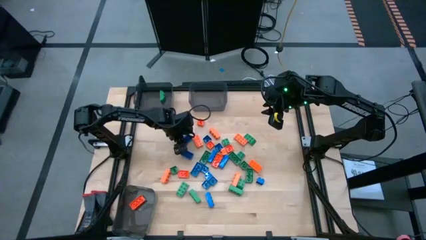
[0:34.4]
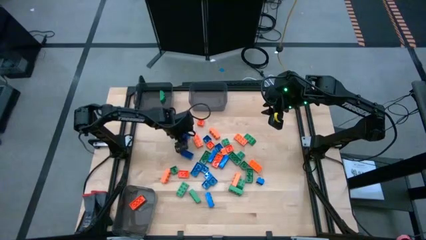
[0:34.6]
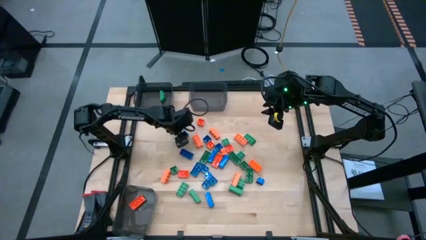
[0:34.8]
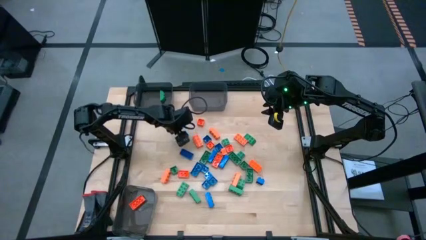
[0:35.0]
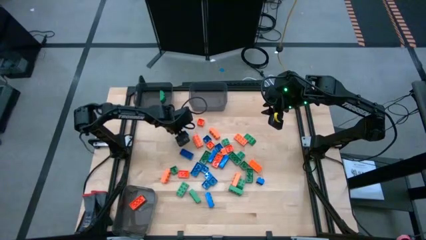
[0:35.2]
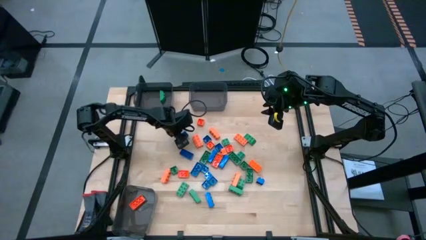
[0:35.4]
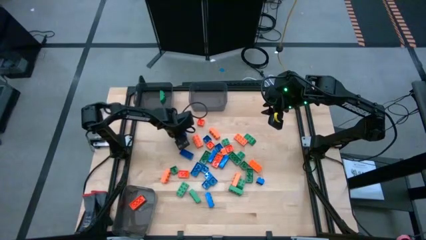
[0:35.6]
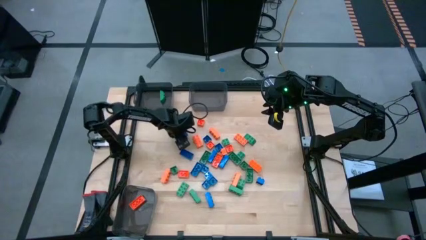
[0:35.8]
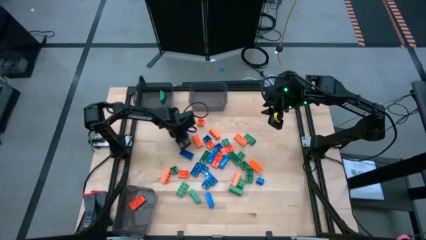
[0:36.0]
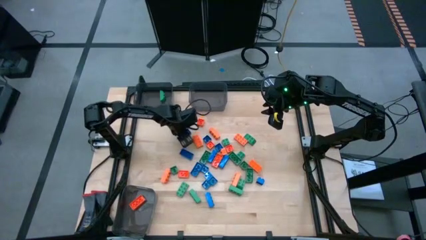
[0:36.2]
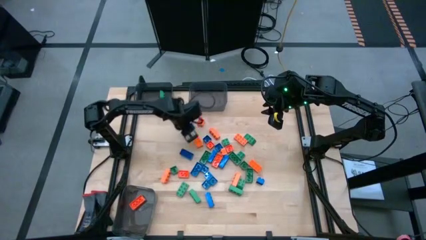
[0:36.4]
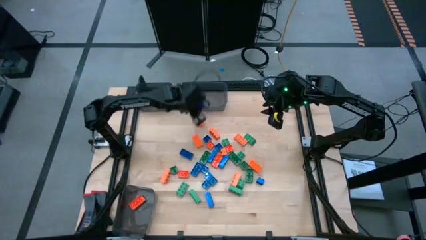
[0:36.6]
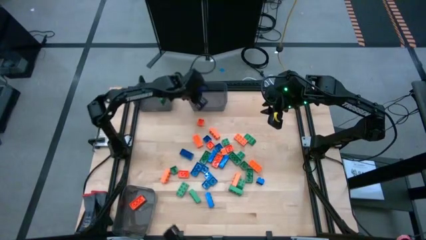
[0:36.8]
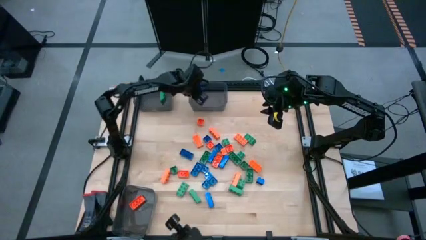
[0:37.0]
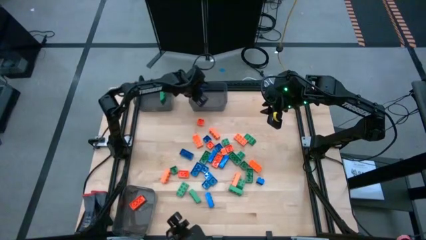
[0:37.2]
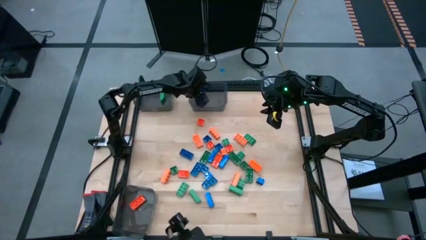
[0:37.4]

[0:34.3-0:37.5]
Task: Sort blocks
Put the blue gamepiece into the top right black bin

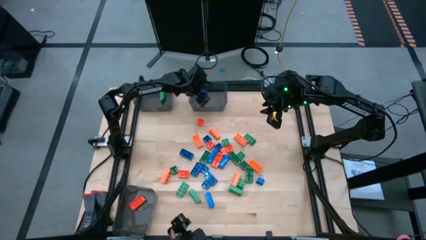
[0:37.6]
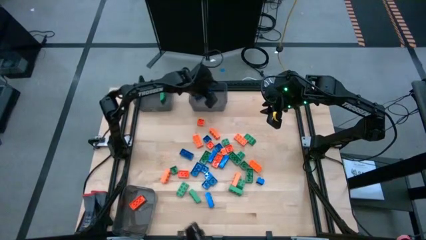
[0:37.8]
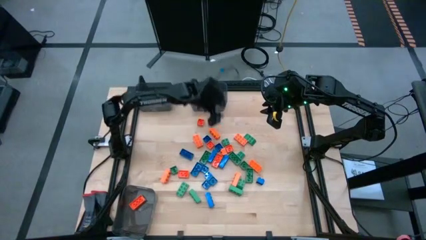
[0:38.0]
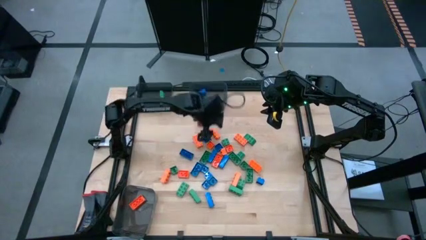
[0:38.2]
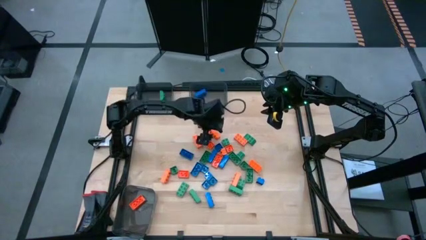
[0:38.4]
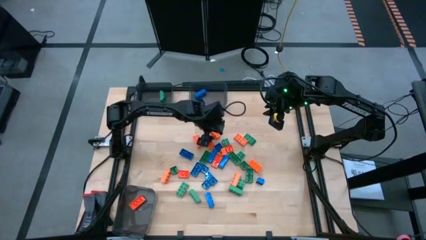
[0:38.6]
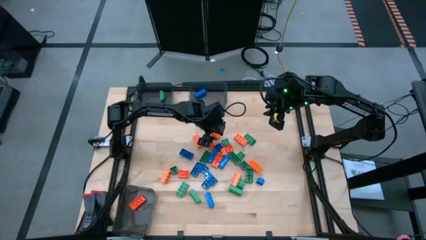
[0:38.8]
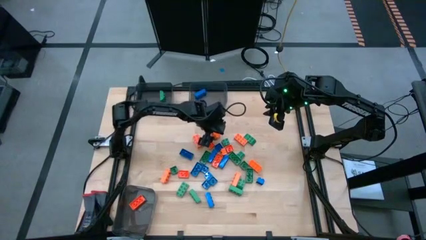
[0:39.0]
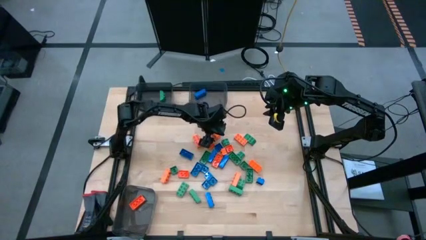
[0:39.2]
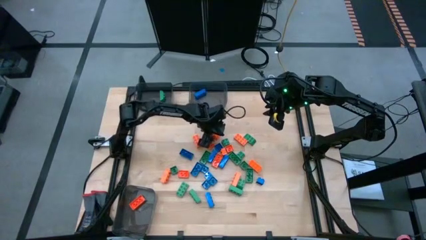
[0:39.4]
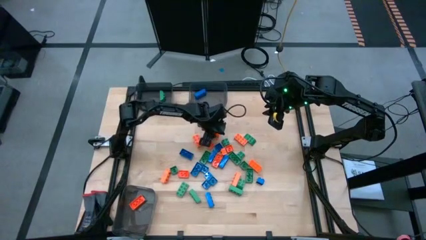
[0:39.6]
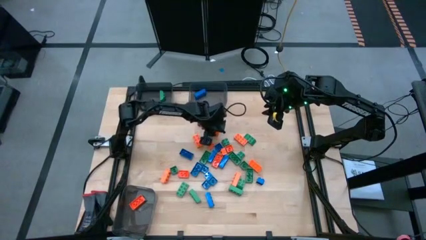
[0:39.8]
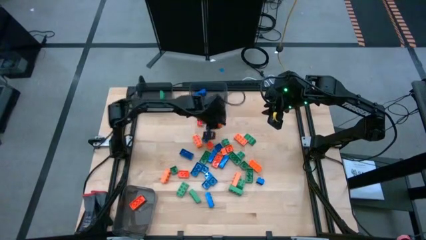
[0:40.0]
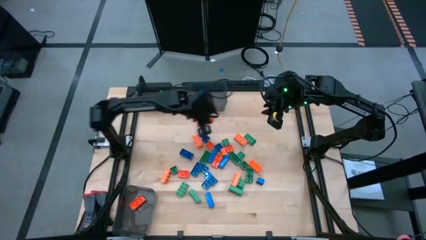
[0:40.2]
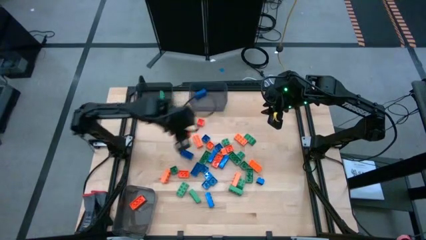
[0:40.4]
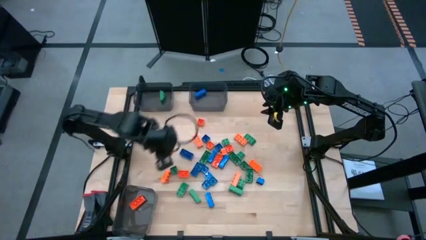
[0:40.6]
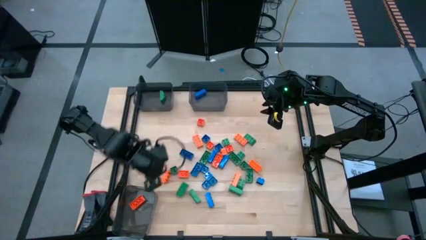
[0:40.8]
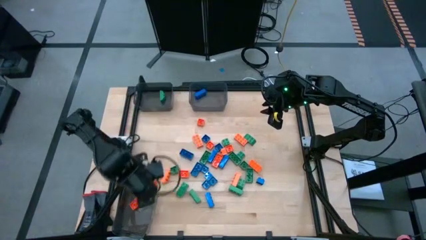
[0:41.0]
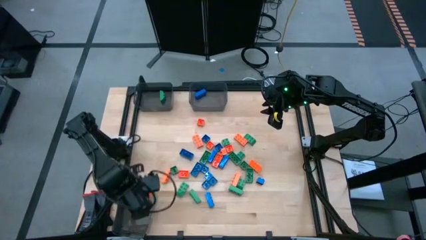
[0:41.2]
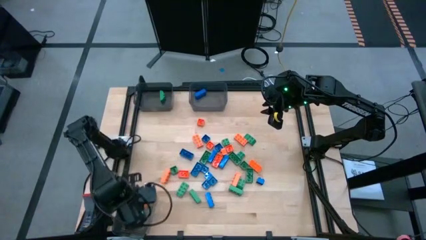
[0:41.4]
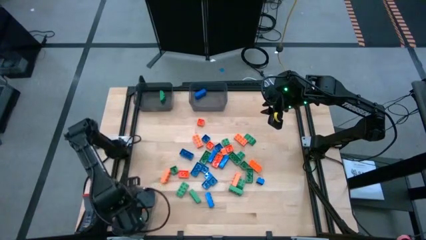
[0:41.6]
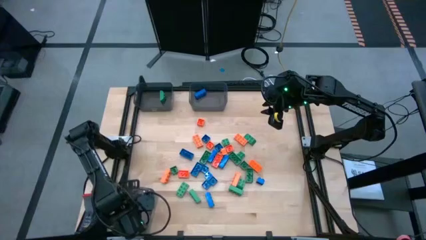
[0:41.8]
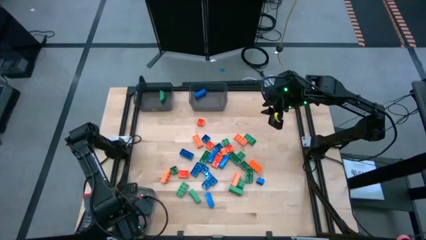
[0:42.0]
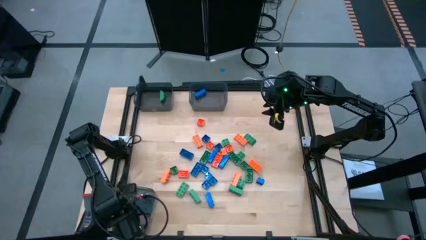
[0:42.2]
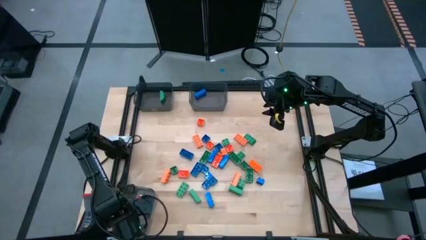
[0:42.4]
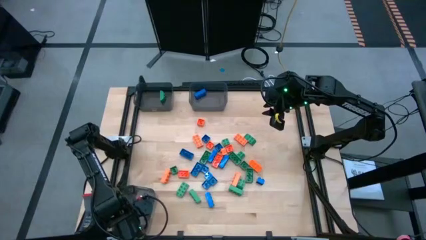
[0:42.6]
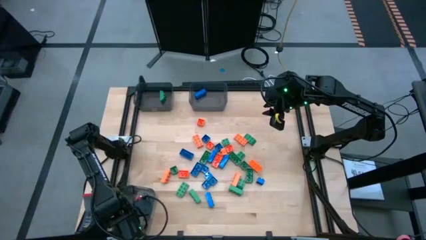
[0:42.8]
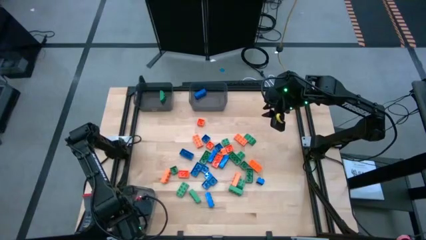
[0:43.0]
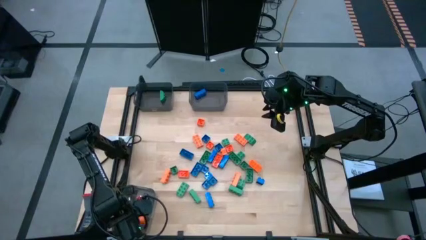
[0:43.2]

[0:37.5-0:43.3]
Put the orange gamepiece into the bottom black bin

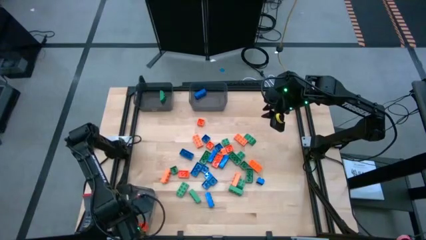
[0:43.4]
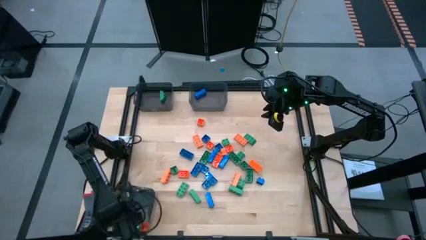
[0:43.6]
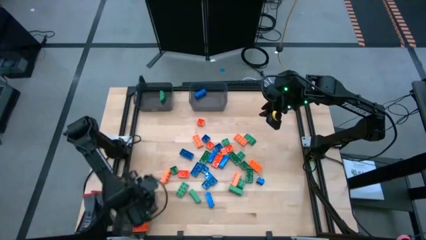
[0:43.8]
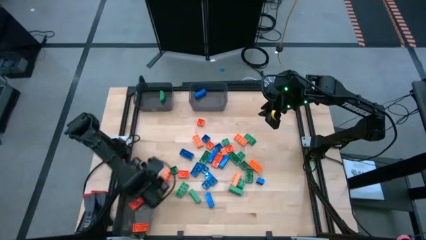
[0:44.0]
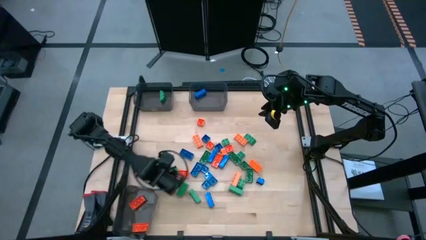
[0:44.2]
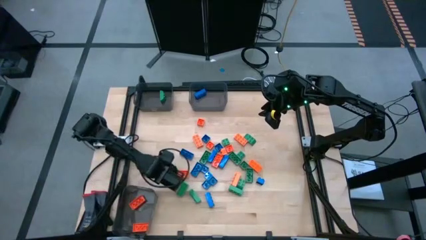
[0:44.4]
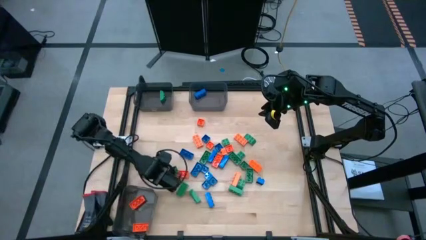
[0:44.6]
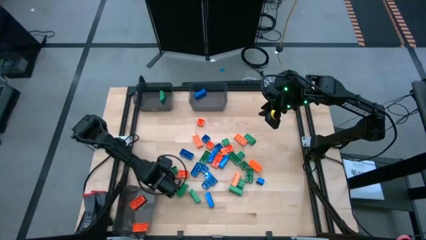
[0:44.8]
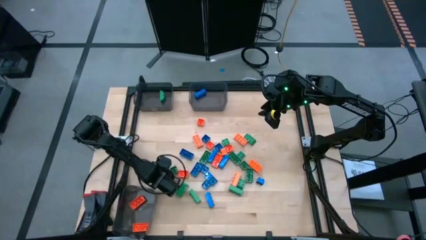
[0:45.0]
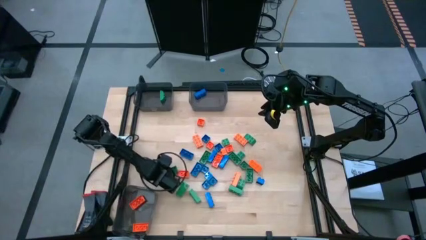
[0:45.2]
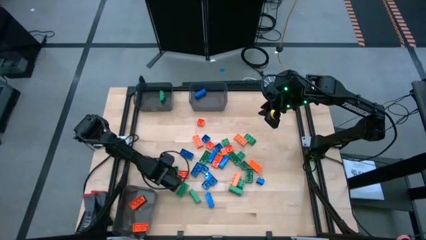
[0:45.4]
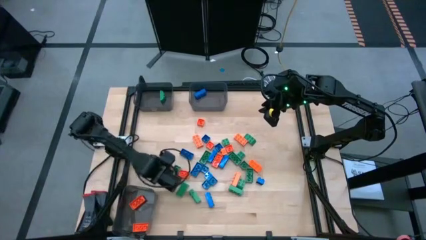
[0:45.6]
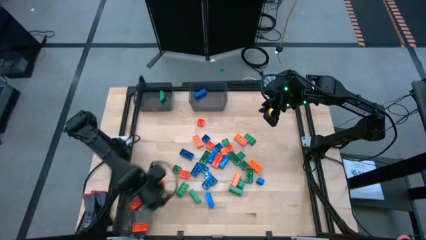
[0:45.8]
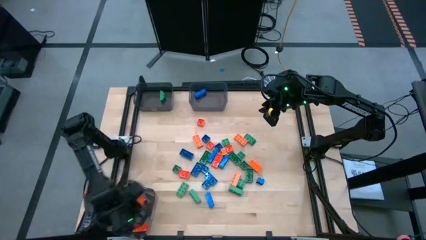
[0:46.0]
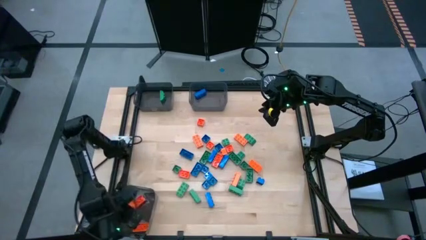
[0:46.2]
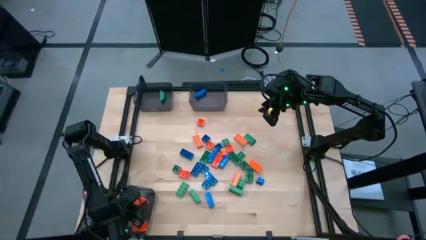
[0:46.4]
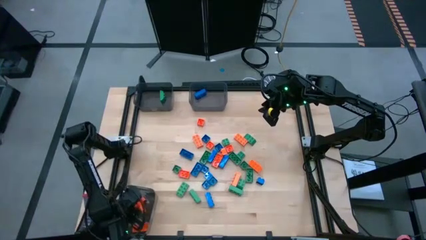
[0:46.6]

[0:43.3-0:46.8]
Put the orange gamepiece into the bottom black bin

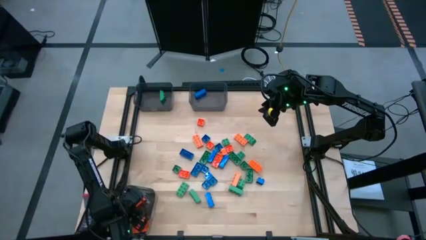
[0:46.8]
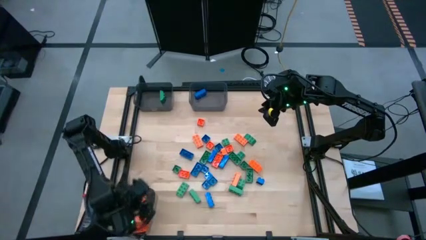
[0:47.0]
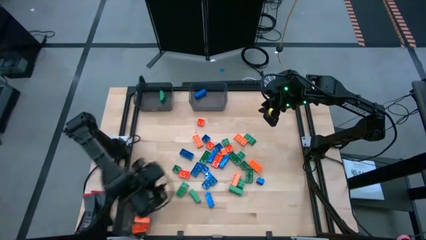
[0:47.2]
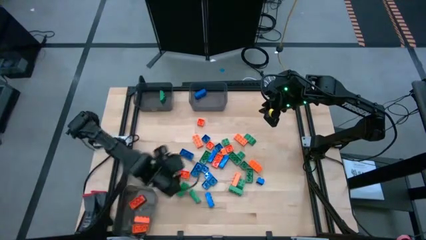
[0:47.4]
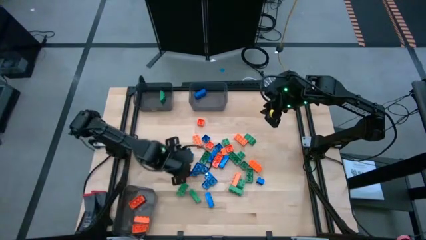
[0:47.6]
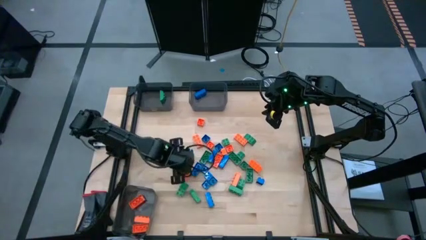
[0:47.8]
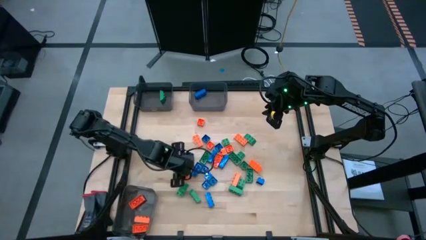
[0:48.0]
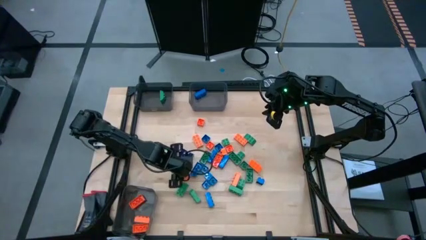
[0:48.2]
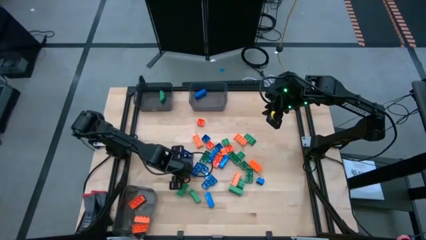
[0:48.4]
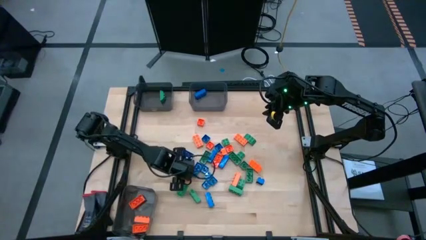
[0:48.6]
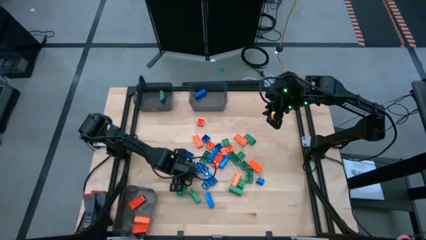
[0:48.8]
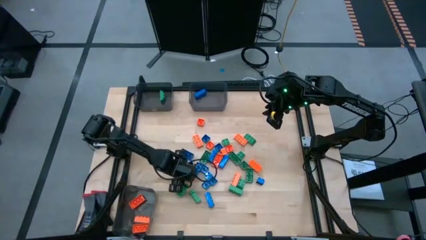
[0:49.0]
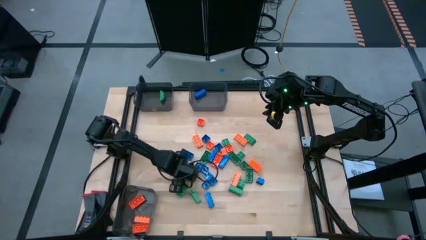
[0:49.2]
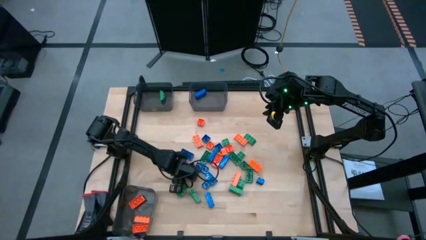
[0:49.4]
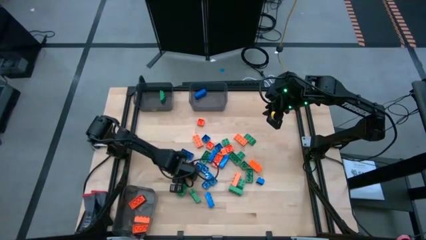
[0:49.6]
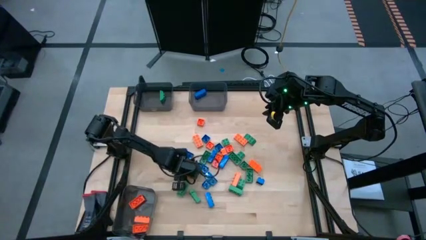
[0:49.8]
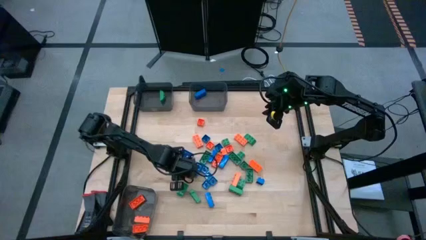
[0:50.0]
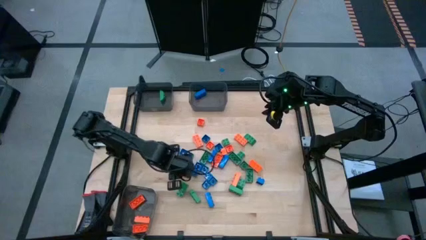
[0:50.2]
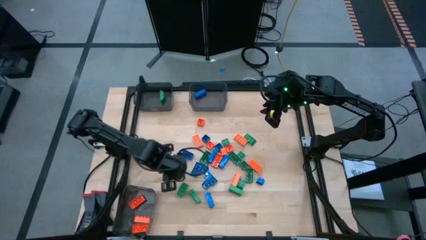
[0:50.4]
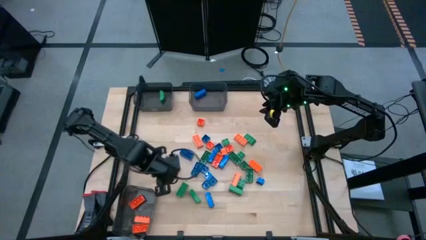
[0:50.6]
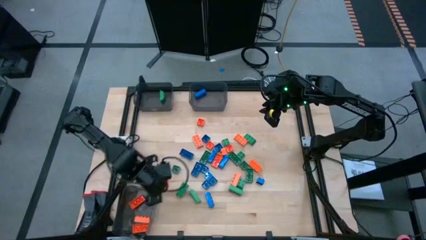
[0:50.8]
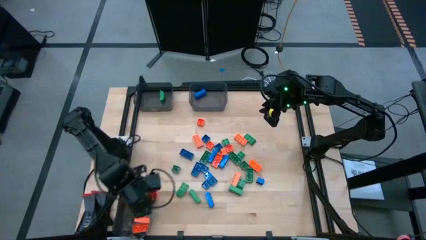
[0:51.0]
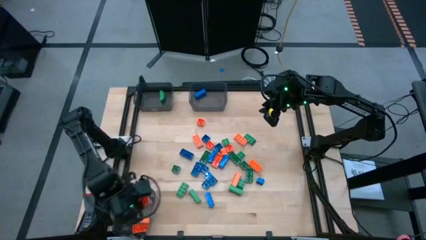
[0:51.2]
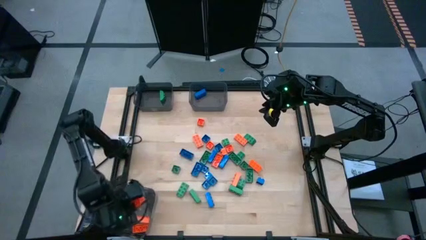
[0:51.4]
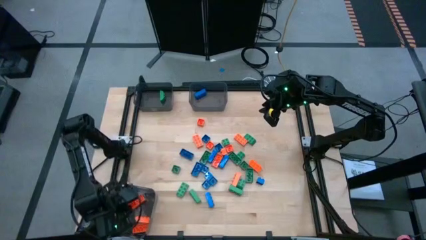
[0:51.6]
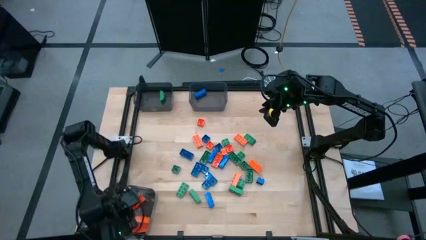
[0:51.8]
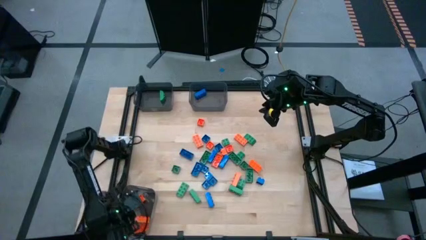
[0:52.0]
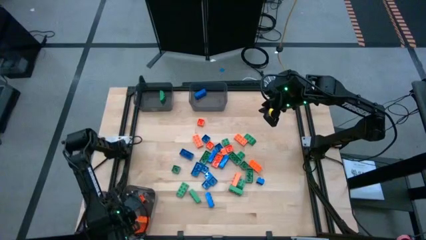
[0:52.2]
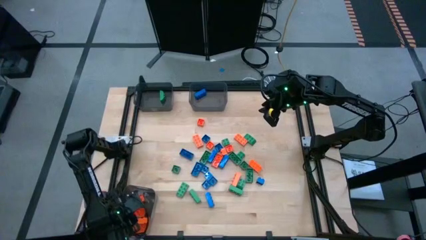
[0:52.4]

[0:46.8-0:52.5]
Put the orange gamepiece into the bottom black bin
